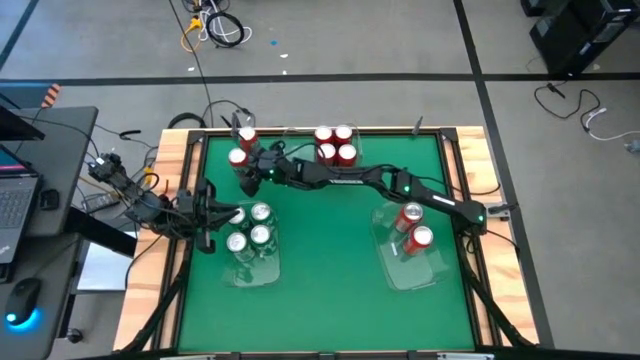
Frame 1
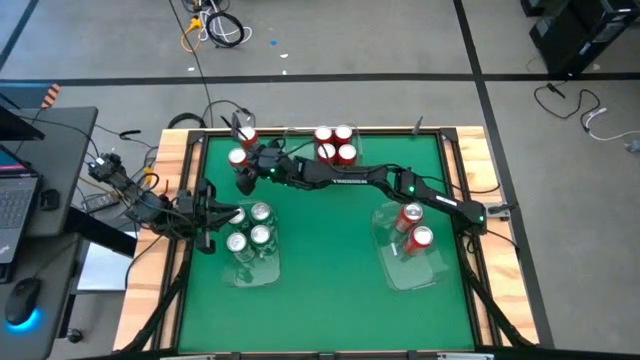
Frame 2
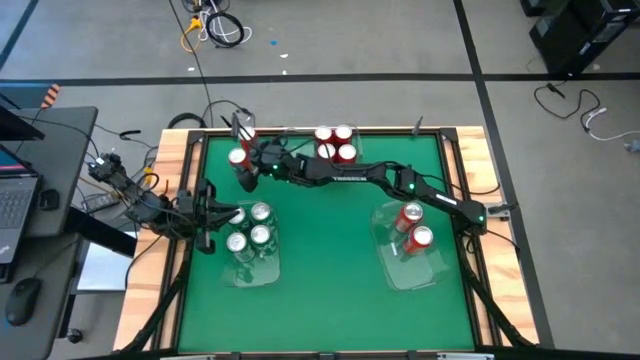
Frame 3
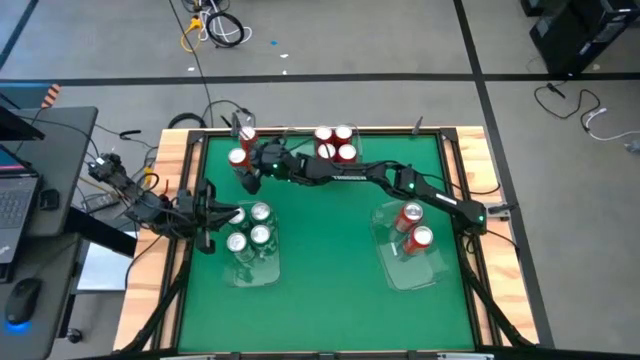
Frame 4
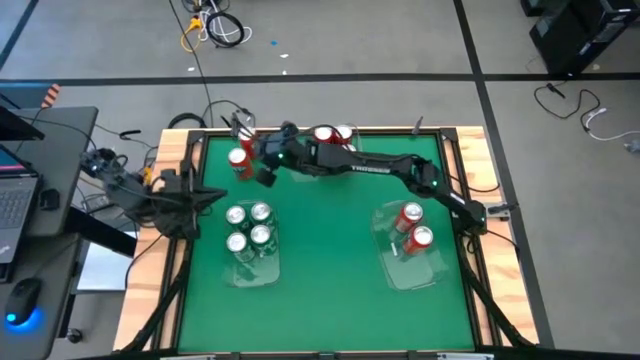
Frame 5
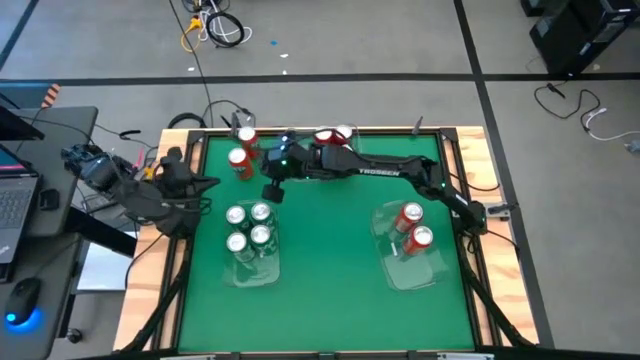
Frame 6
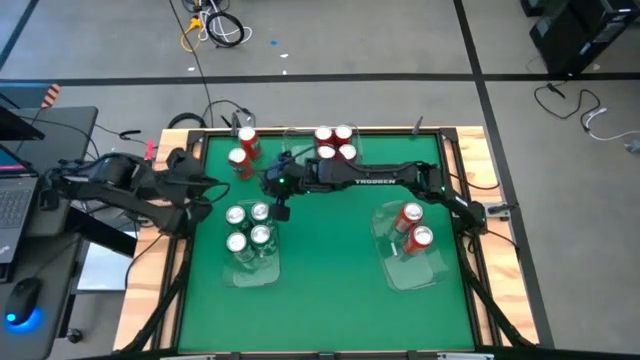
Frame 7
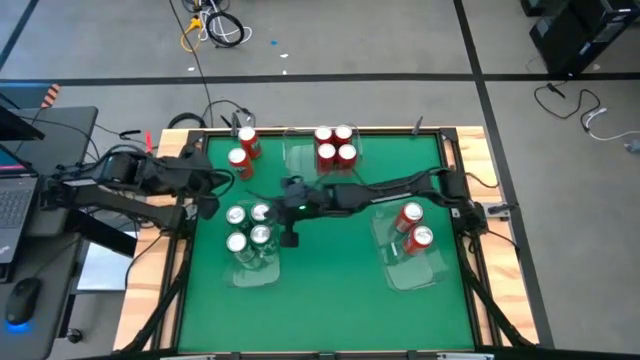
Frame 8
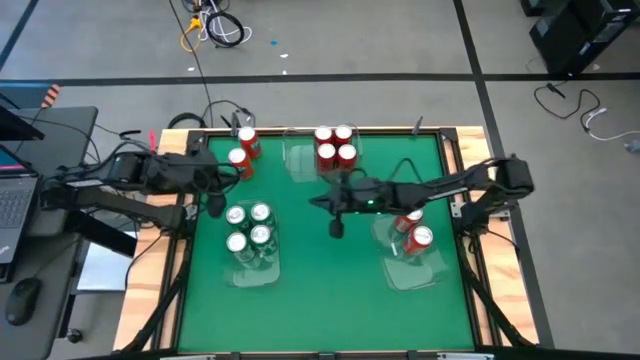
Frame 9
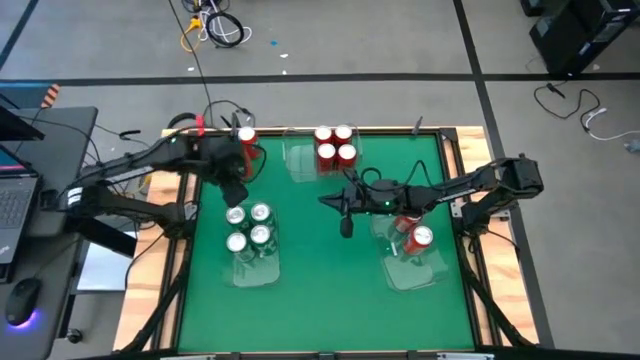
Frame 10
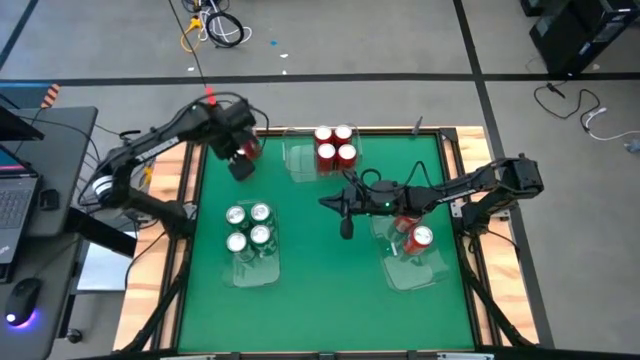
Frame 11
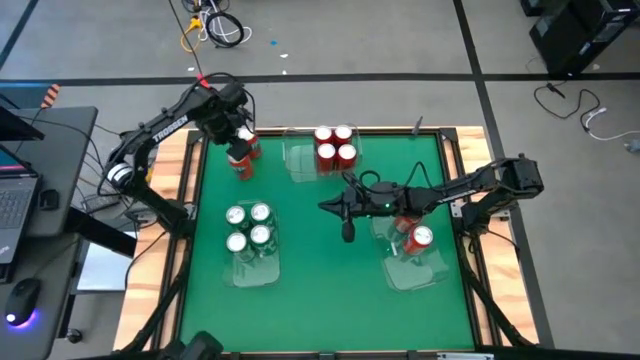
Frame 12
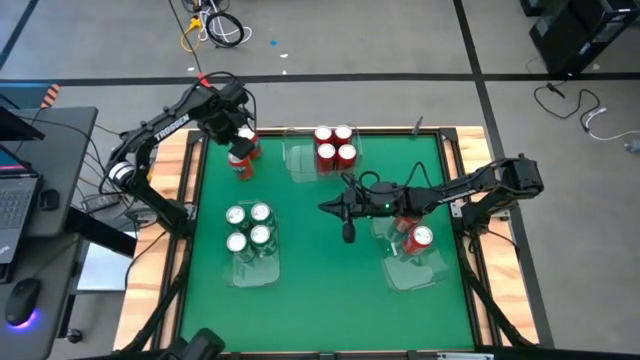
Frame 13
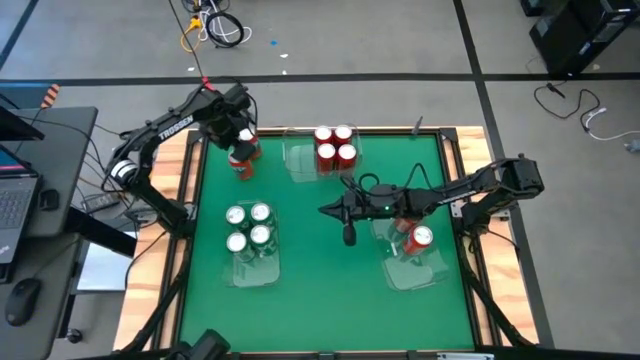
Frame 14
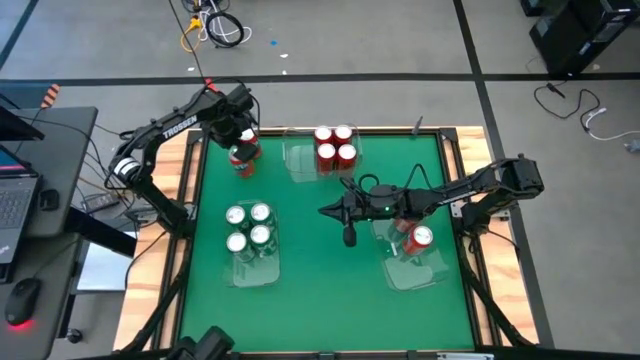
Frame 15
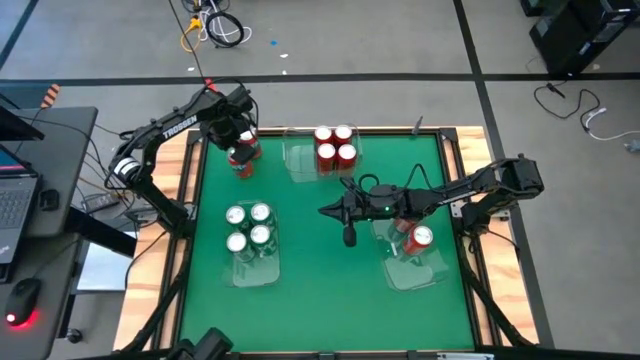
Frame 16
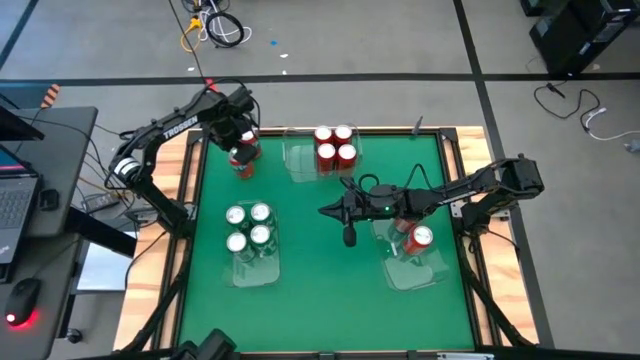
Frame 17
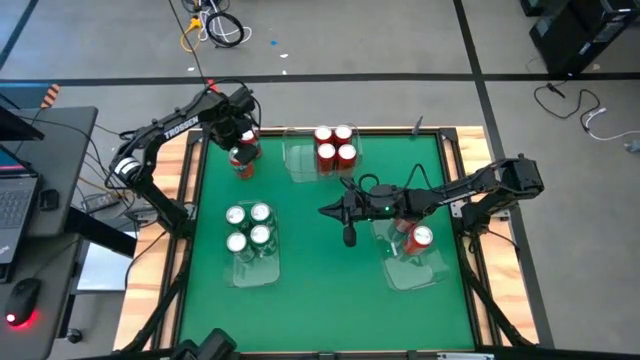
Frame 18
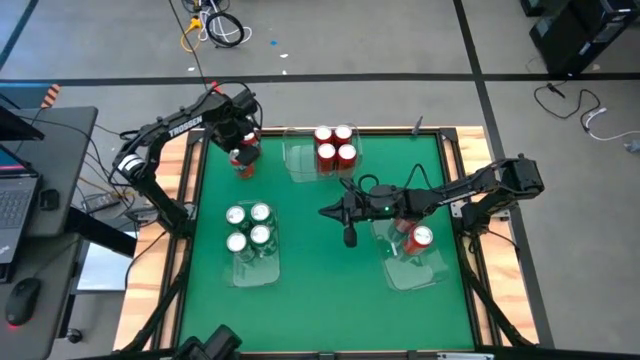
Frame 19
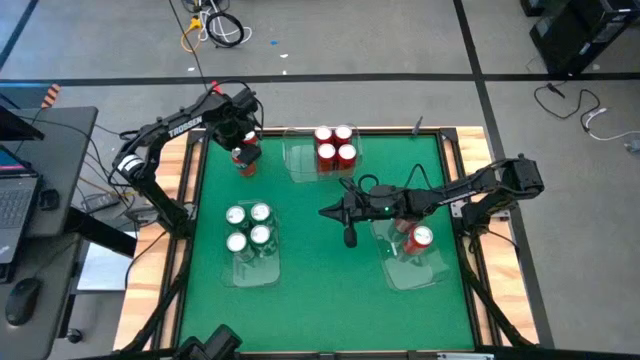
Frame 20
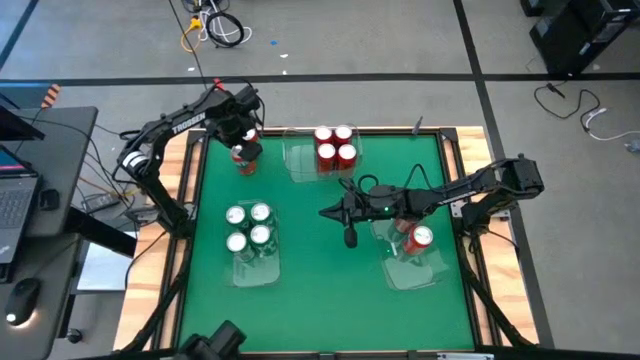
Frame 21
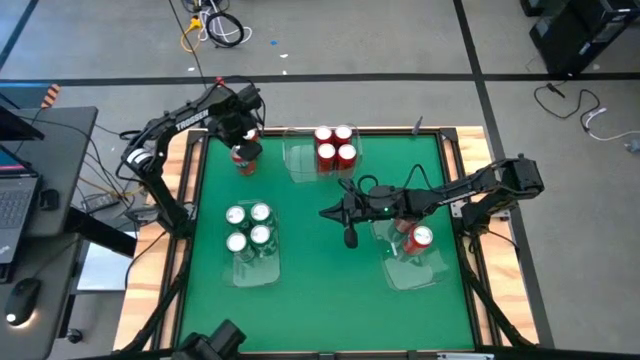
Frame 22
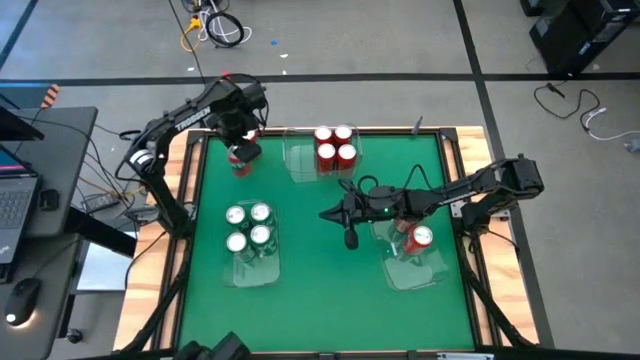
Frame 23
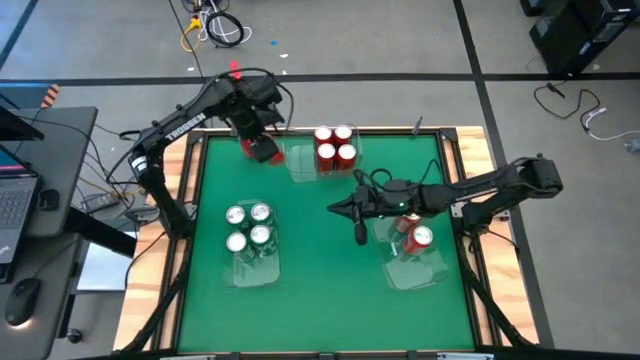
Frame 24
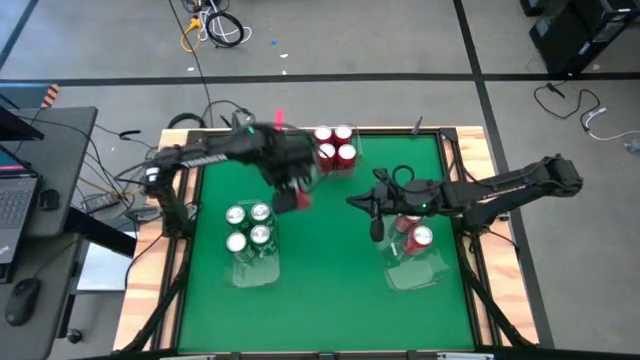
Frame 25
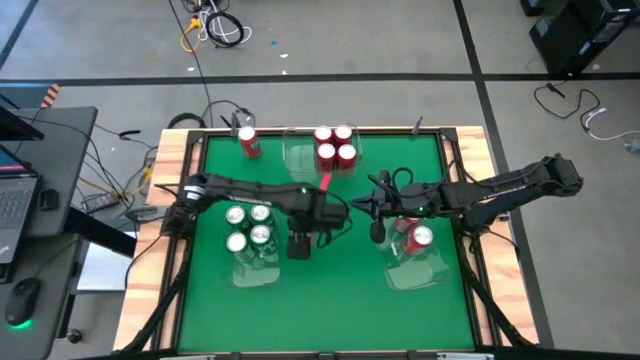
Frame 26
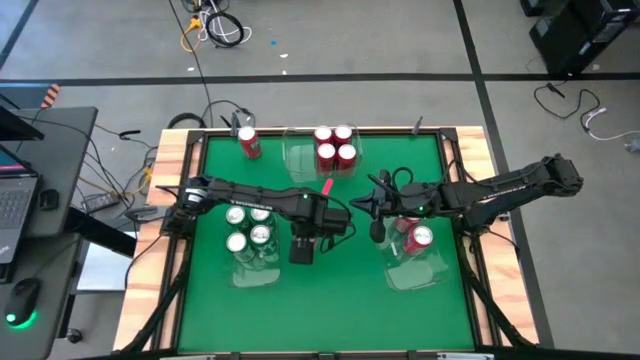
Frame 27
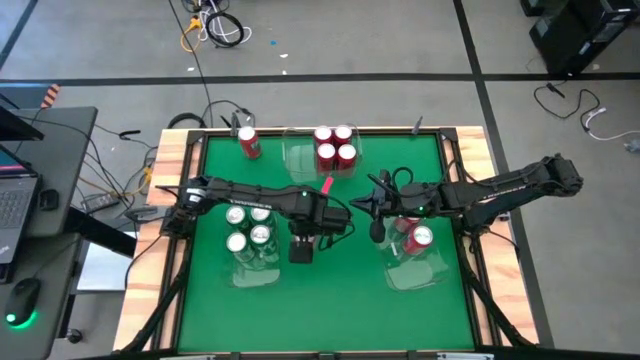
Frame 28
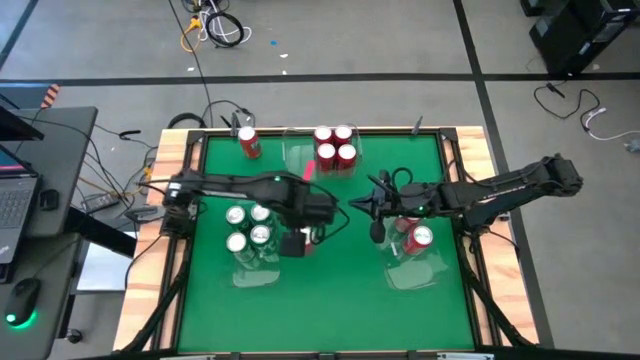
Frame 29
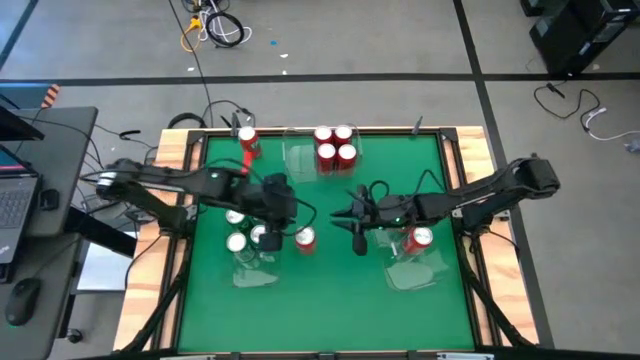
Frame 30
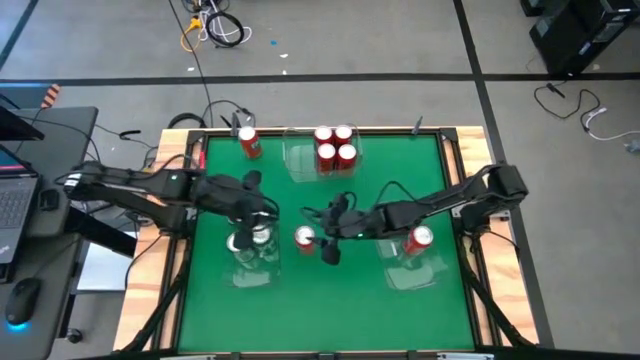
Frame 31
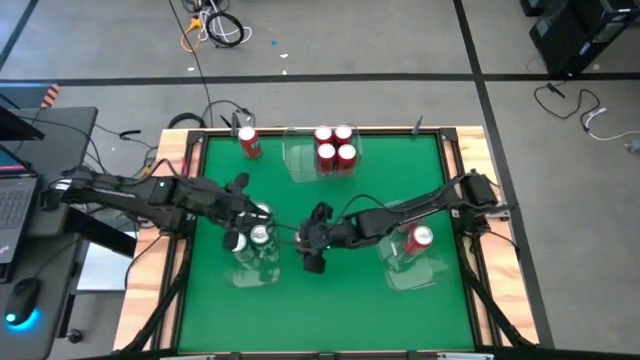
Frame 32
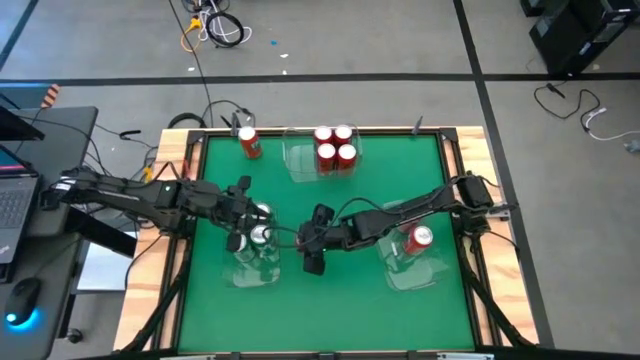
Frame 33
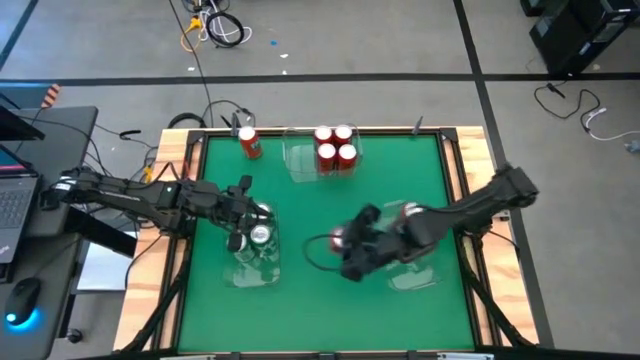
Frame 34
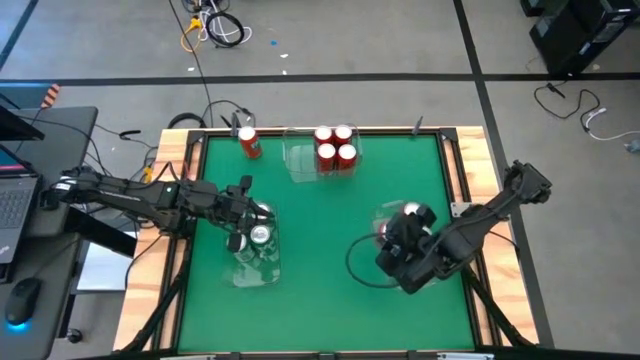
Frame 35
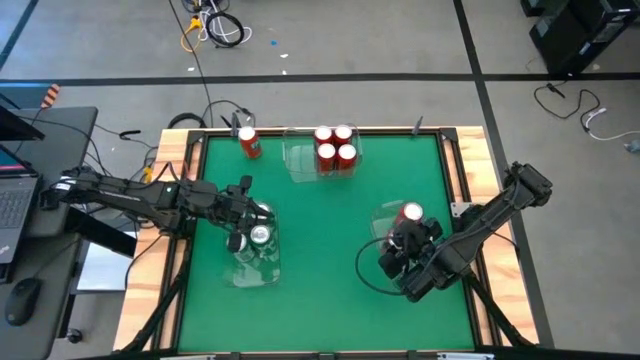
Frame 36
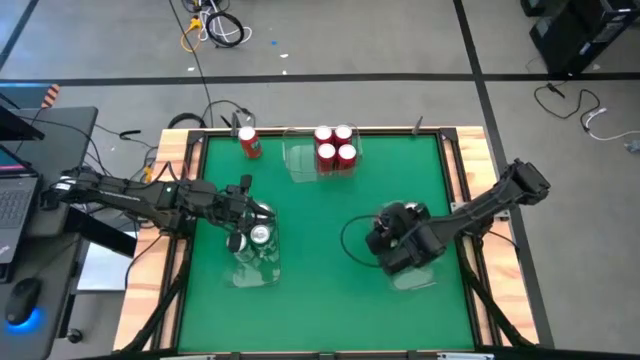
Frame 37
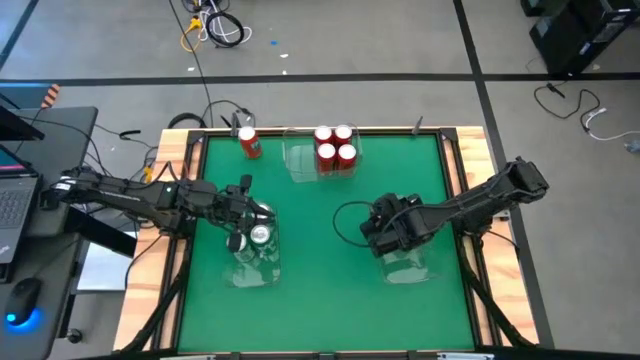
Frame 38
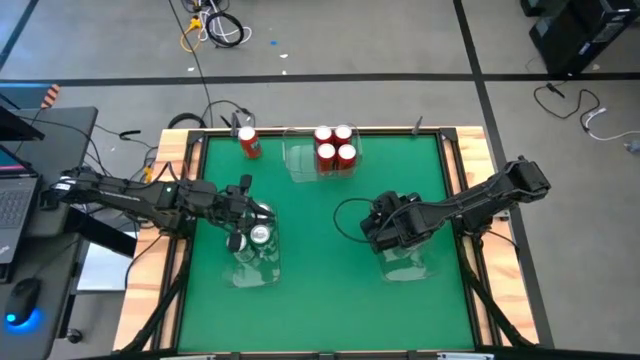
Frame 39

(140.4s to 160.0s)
Task: Sort soda cans
Put the red soda can into the middle right transparent bin
